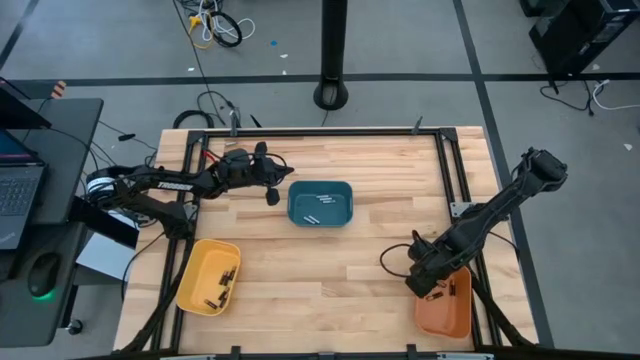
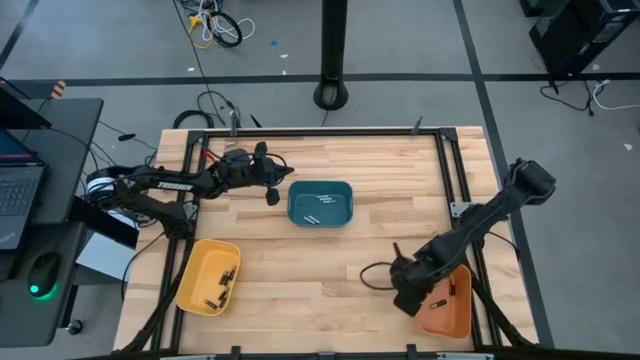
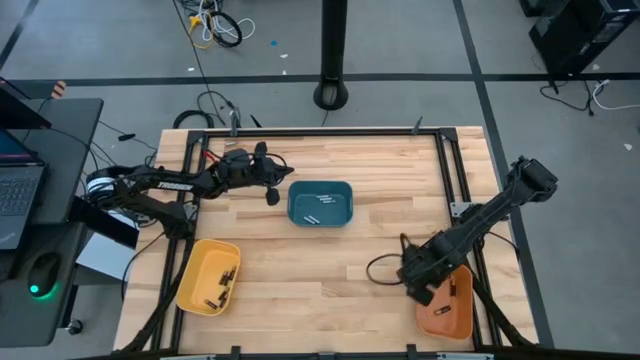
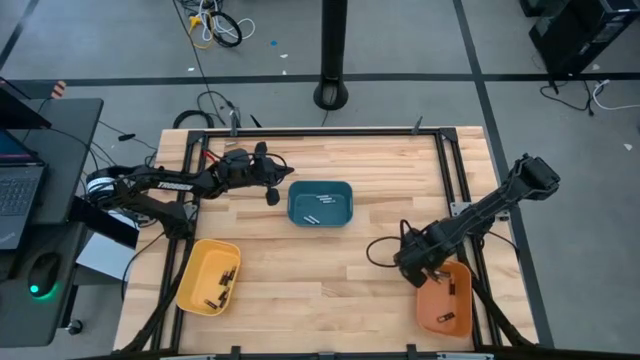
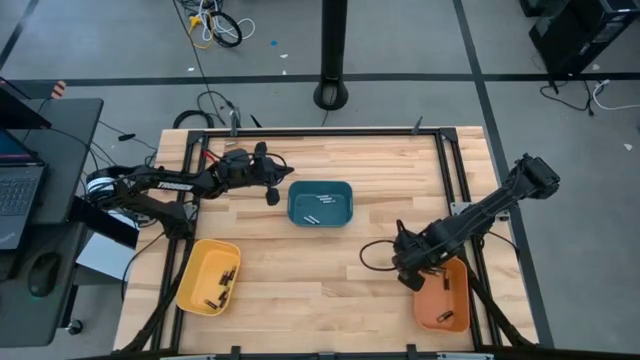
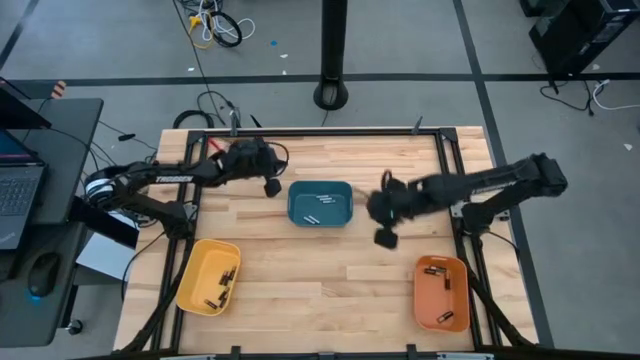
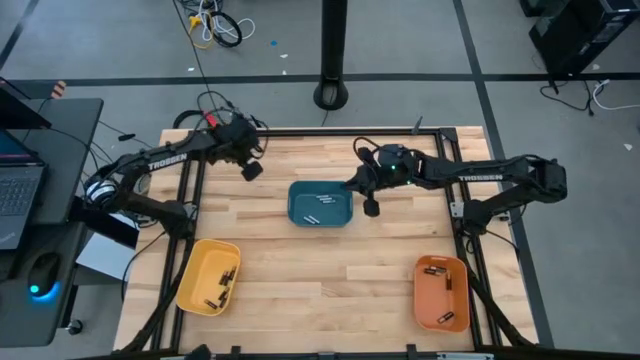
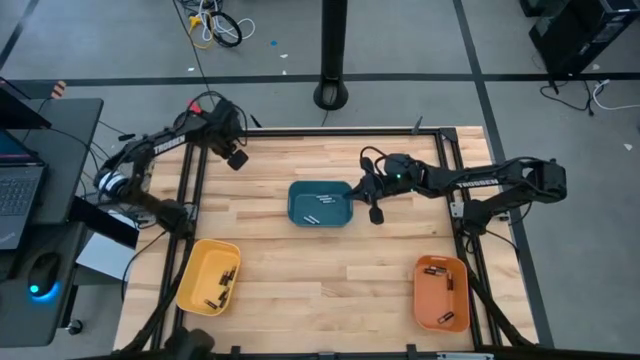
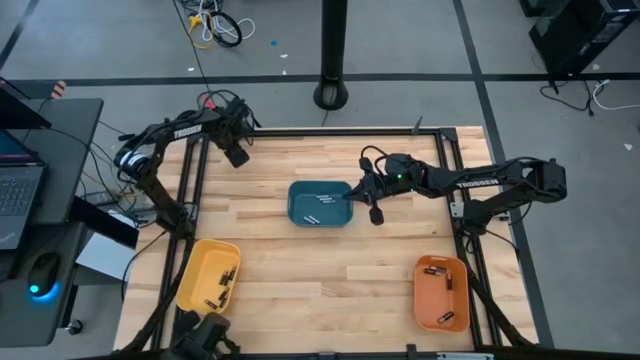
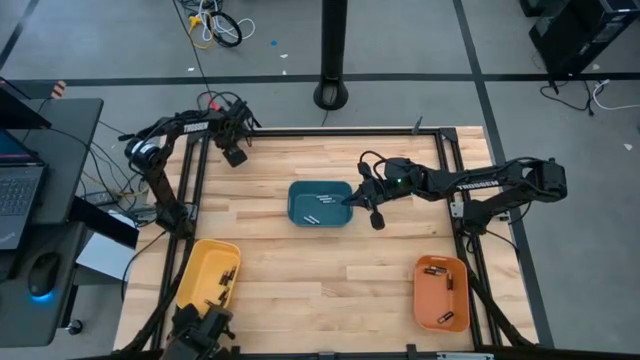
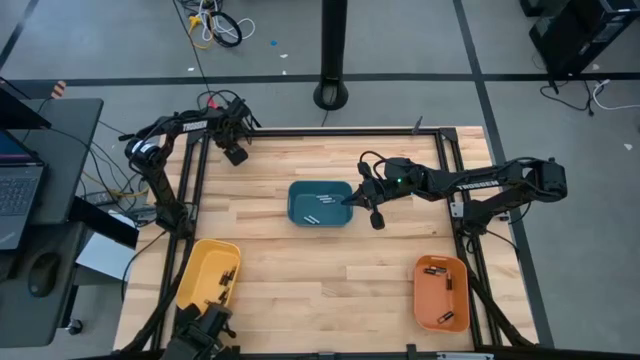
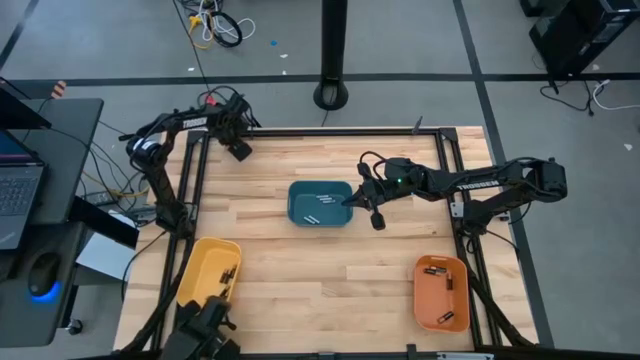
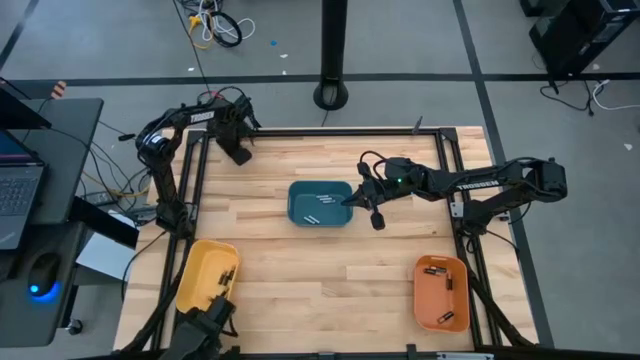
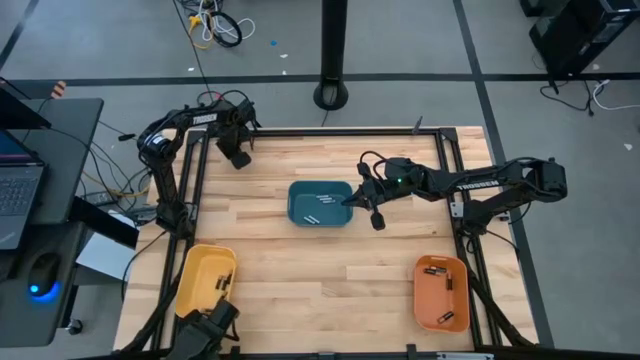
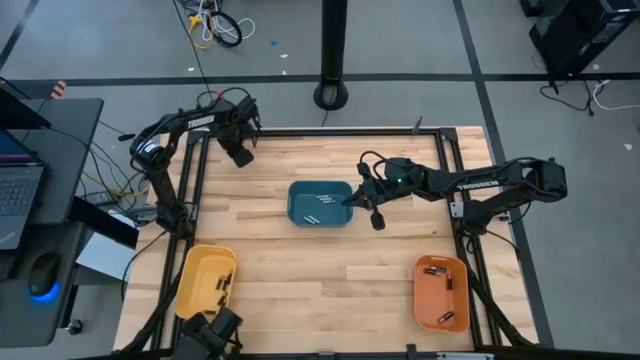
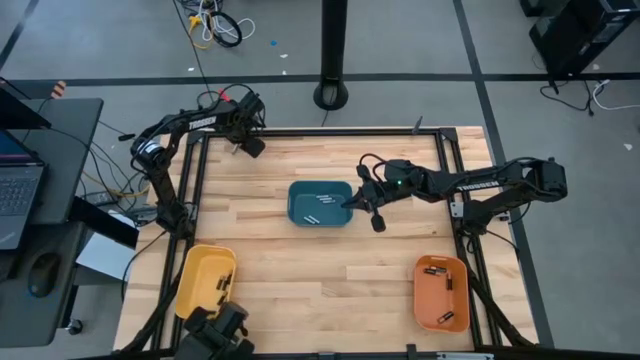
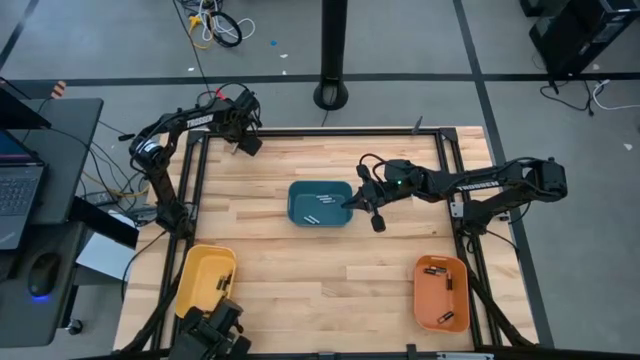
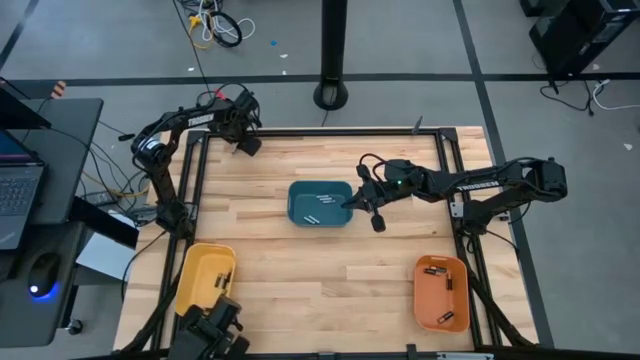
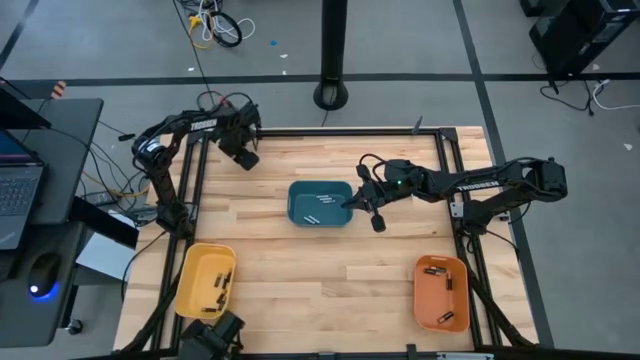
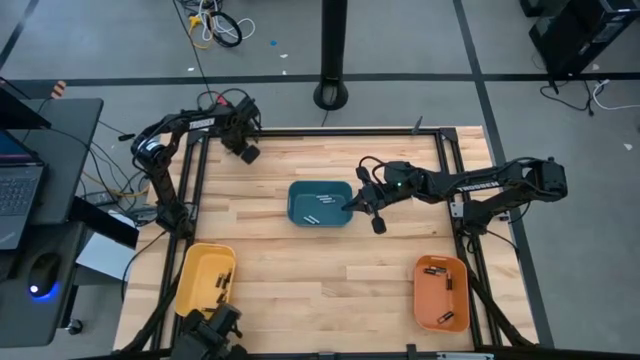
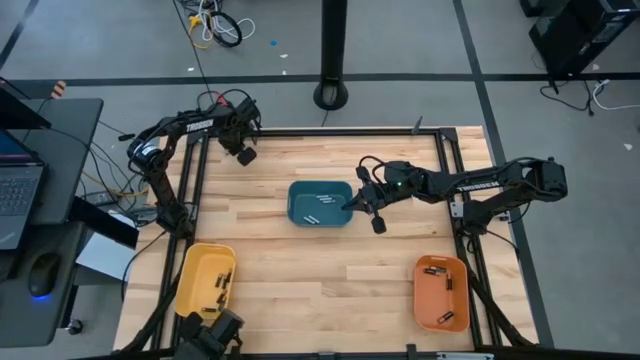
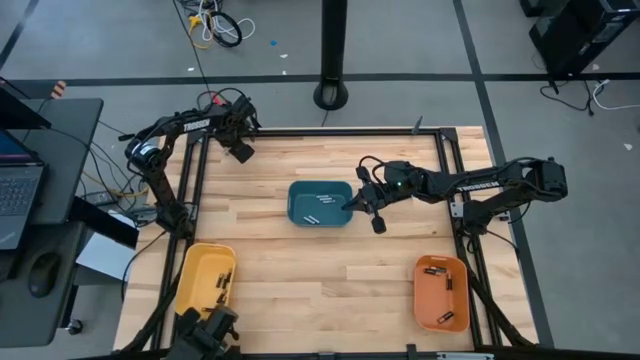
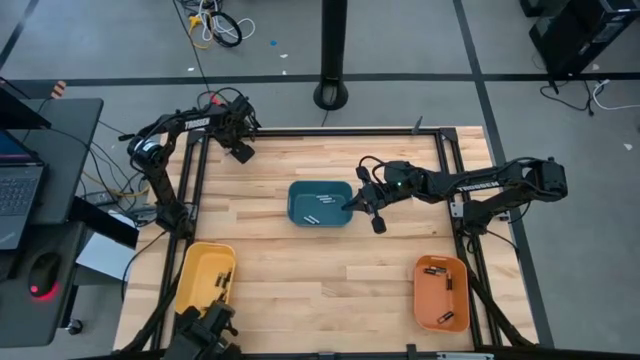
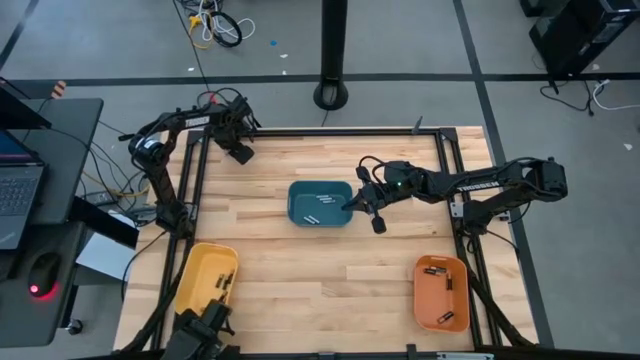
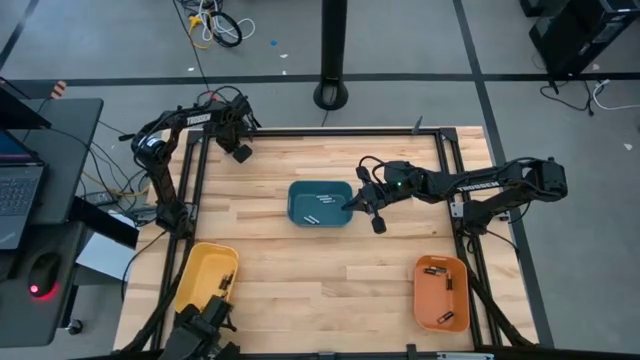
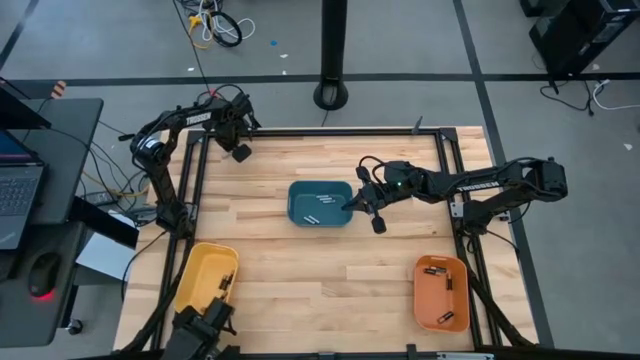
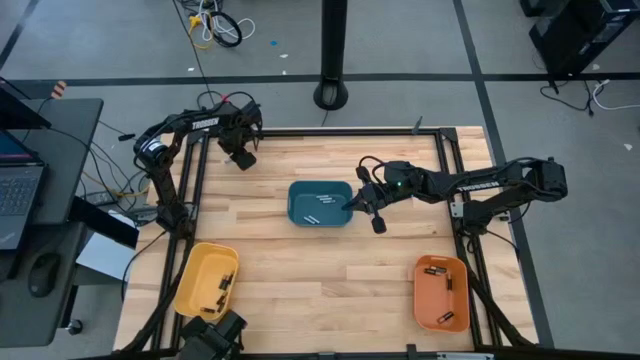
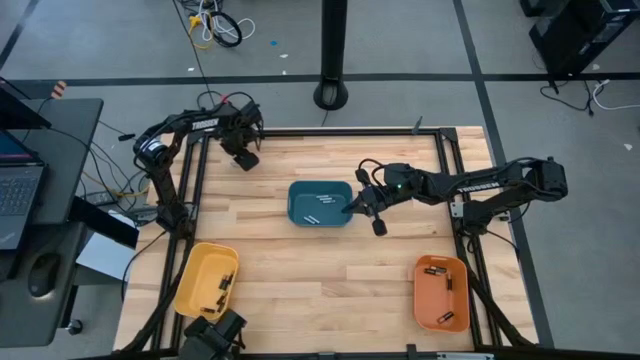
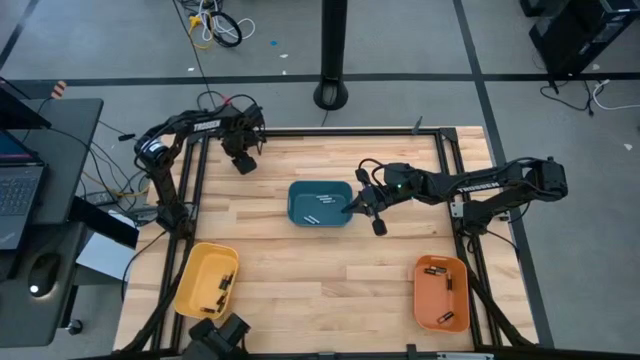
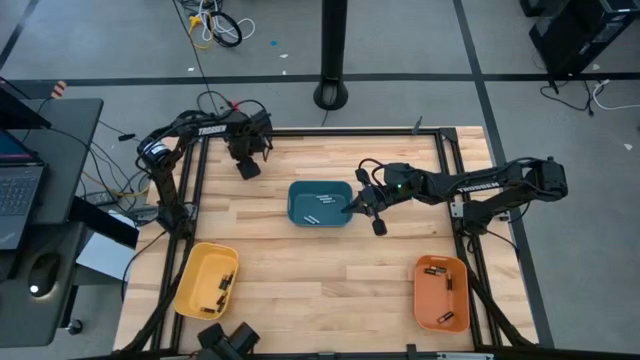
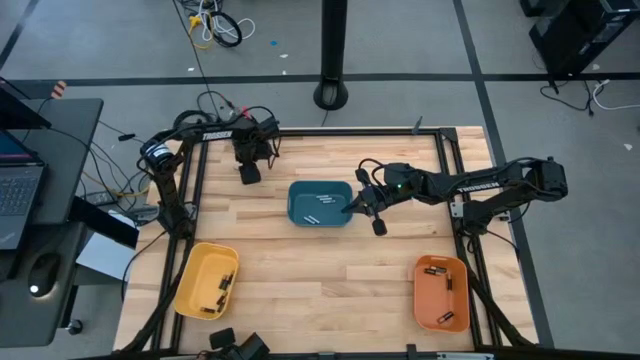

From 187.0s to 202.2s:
Task: Sort batteries
Put the silver battery into the blue bin

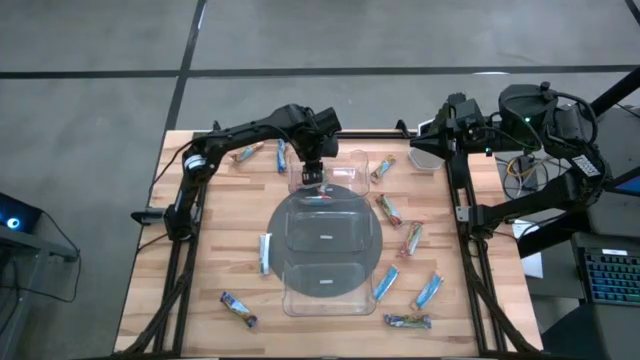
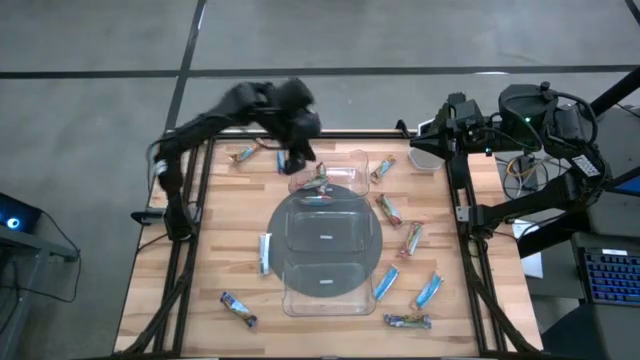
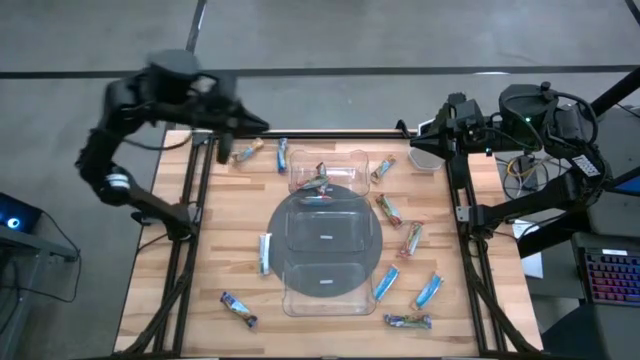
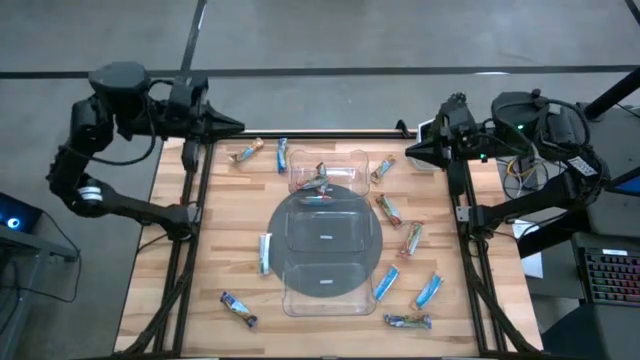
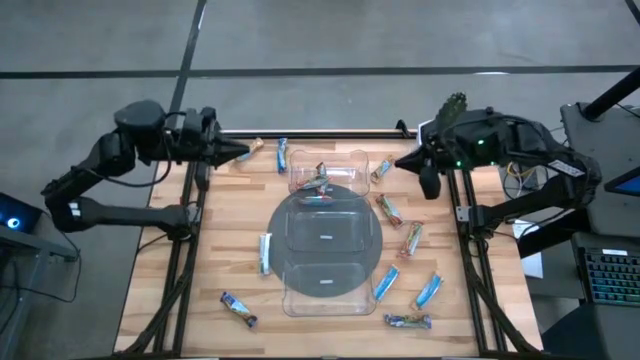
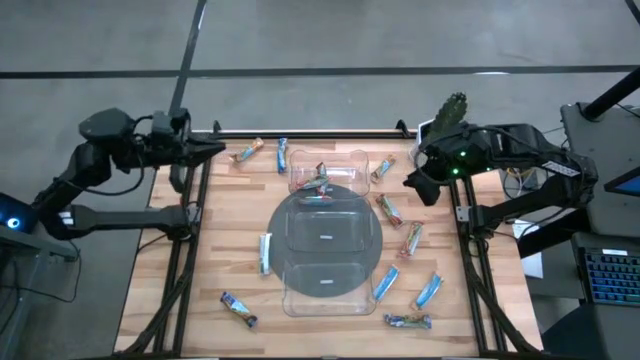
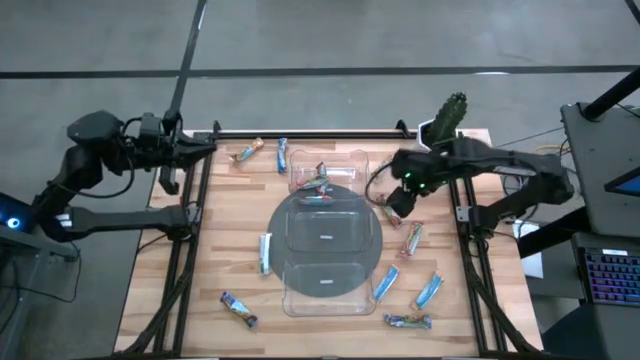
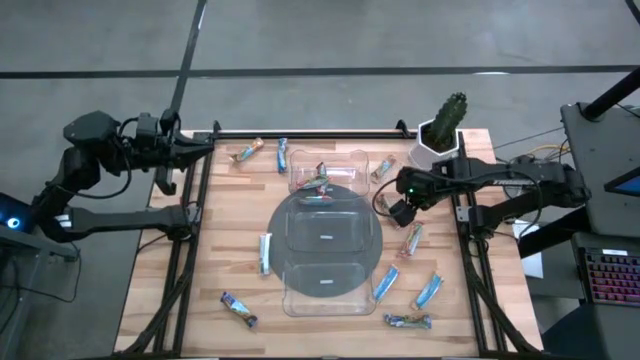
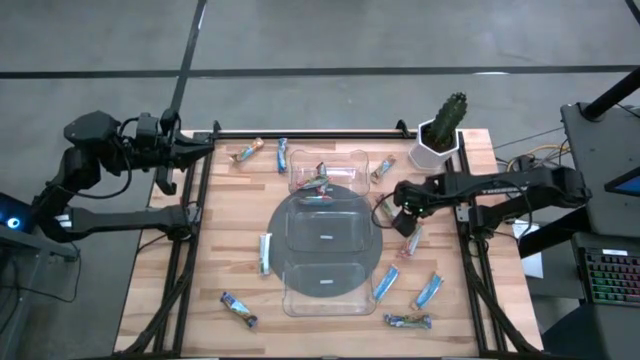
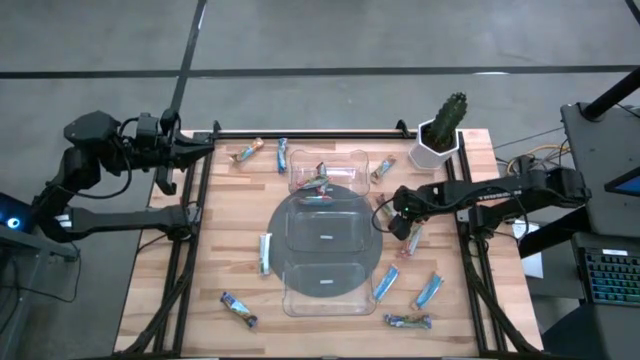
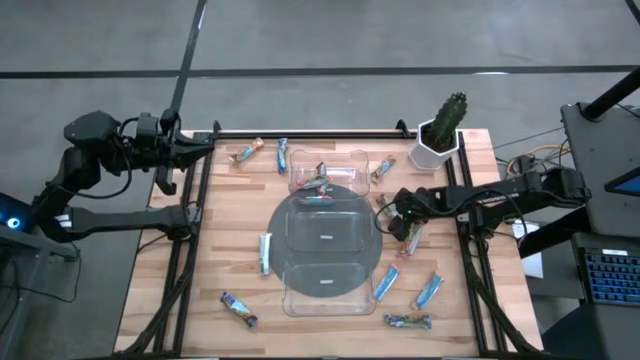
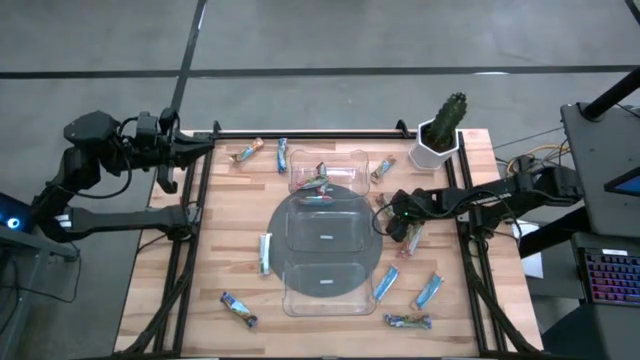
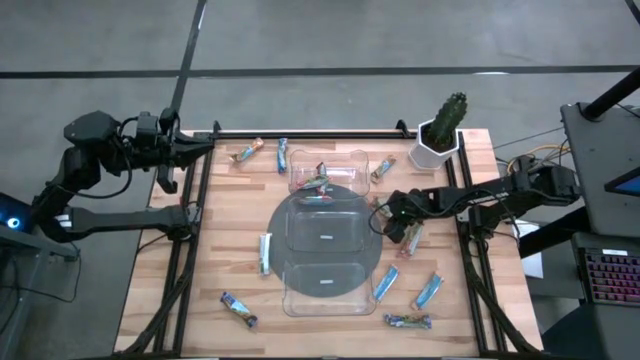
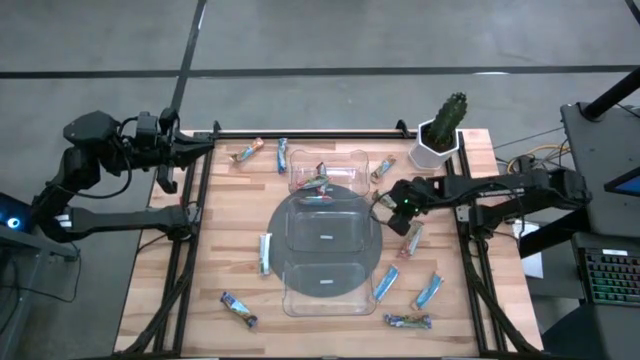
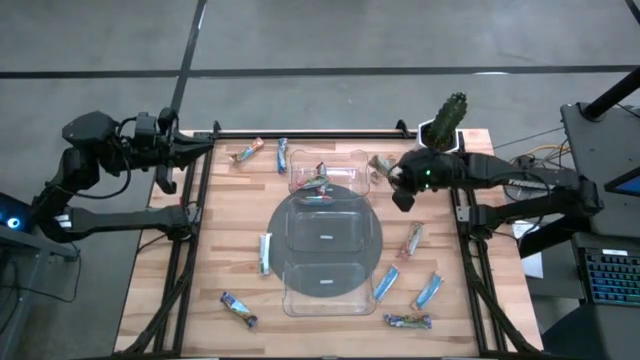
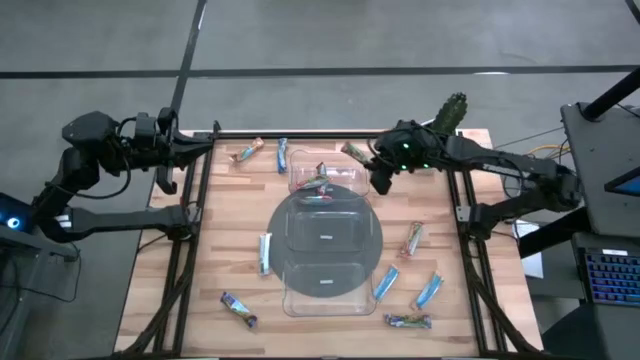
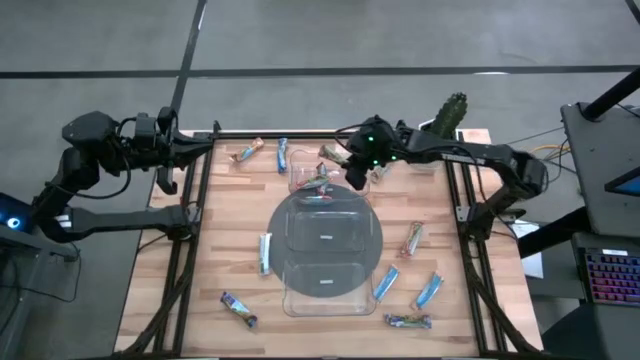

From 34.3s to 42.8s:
Task: Pick and place Granola Bars by type
Put the red granola bar into the top transparent bin
